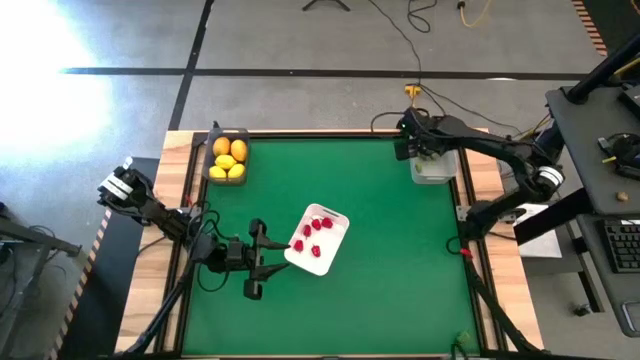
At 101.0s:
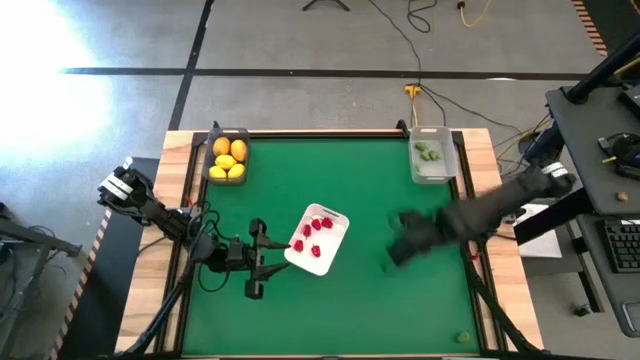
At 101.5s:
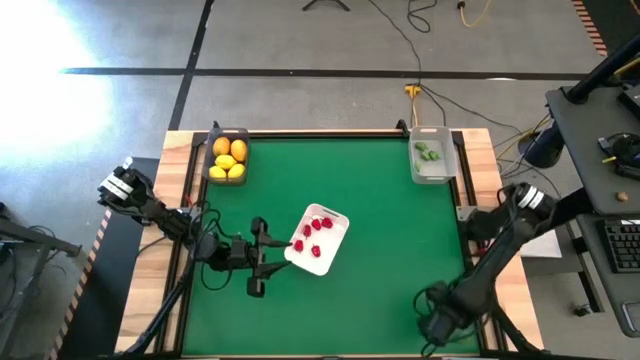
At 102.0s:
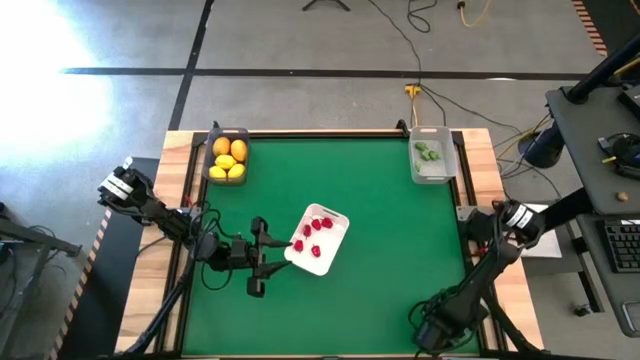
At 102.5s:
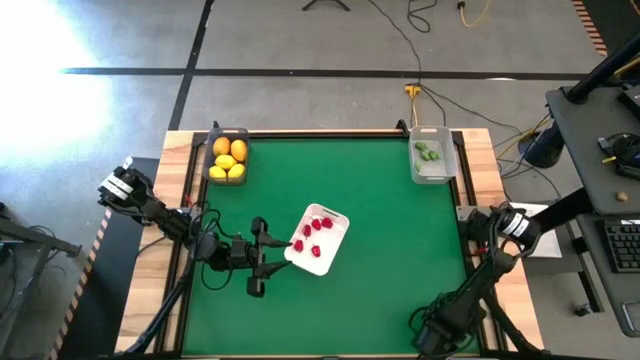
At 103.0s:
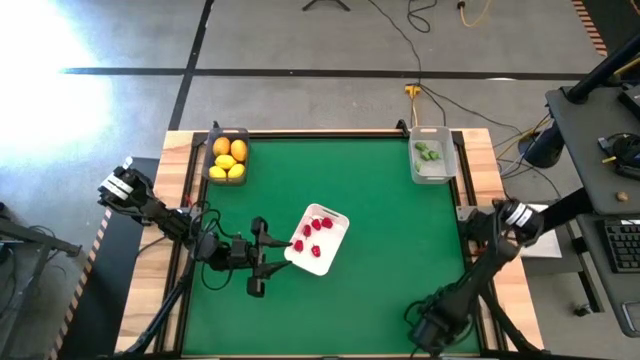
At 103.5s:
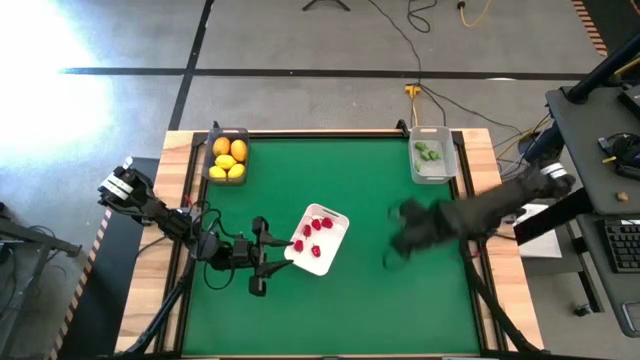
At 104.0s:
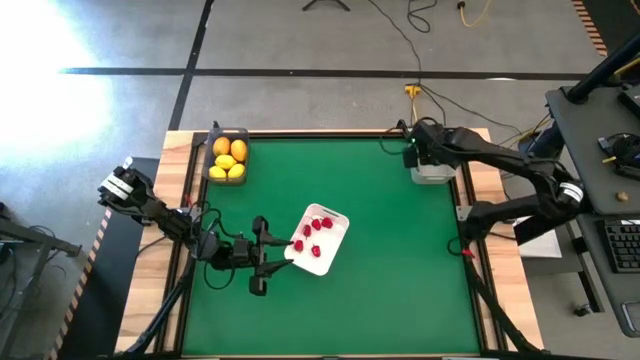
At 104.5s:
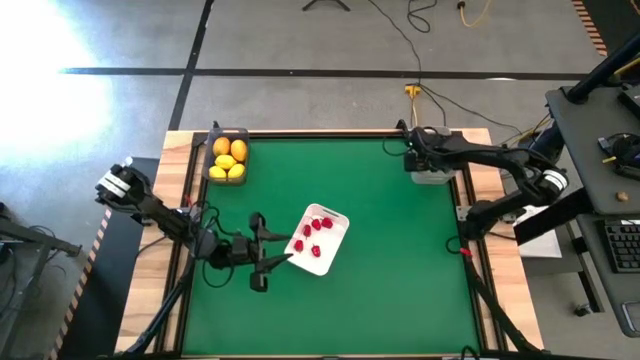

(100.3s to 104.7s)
Task: Sort produce into baskets
Put the green chili pepper into the grey bin

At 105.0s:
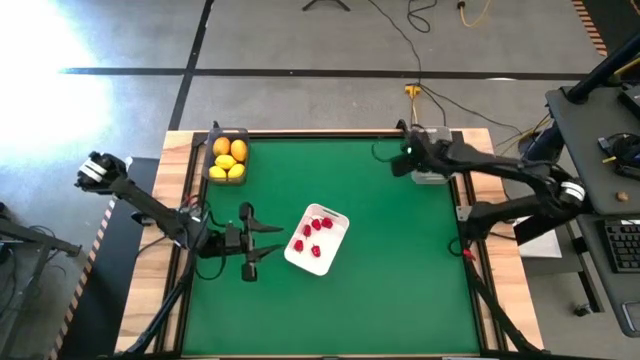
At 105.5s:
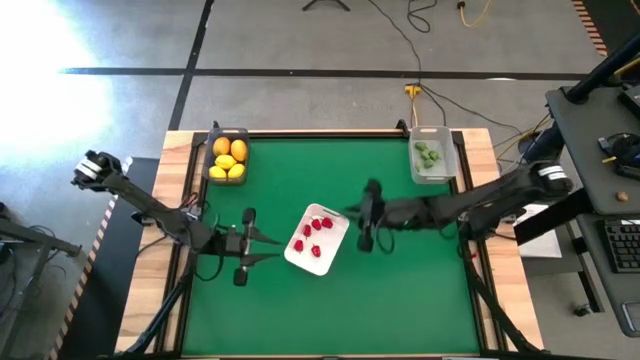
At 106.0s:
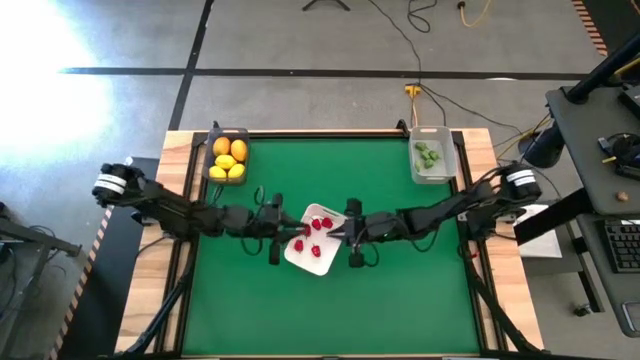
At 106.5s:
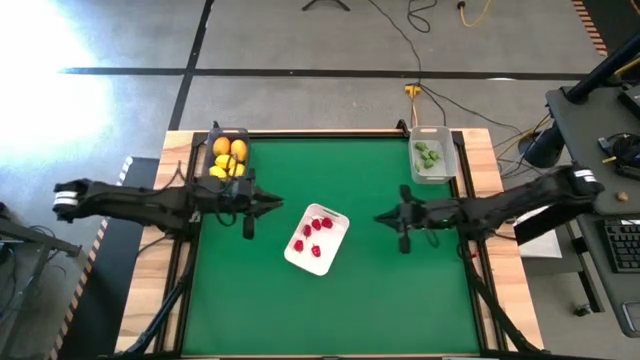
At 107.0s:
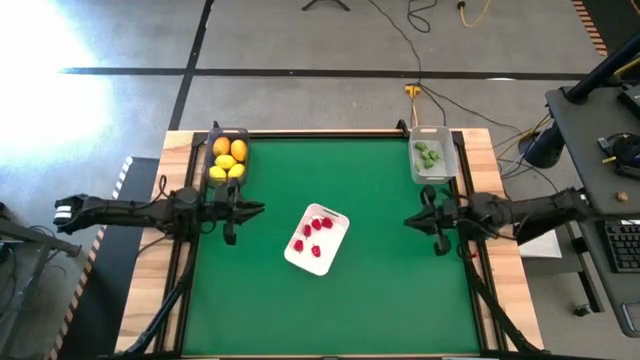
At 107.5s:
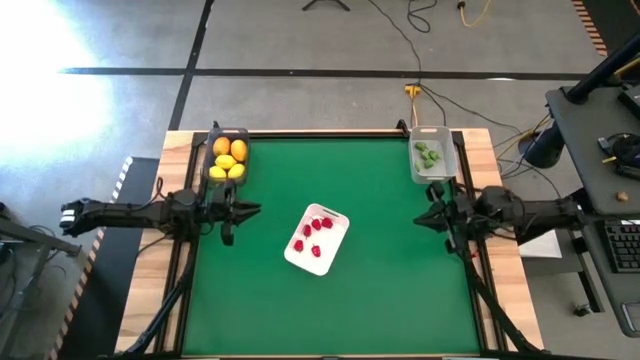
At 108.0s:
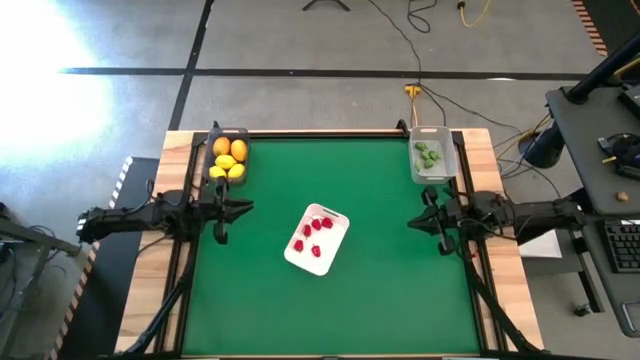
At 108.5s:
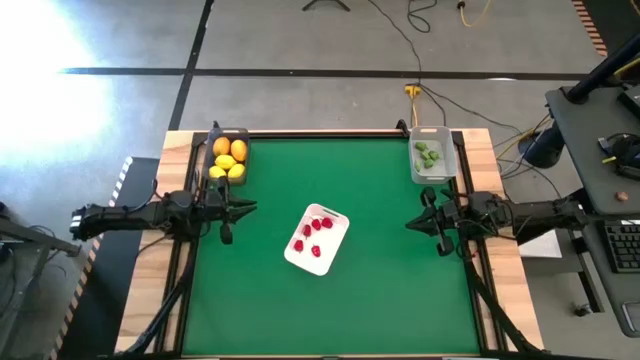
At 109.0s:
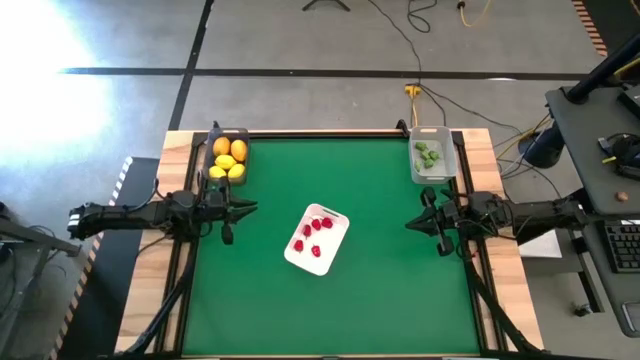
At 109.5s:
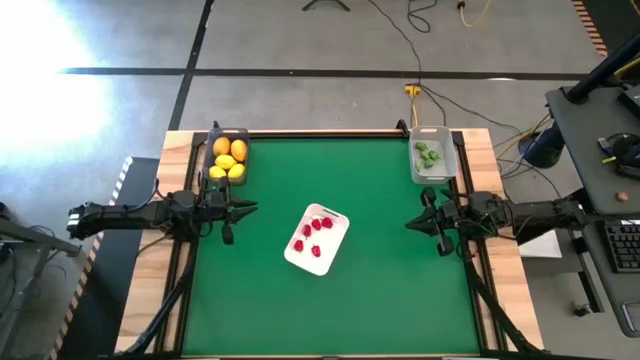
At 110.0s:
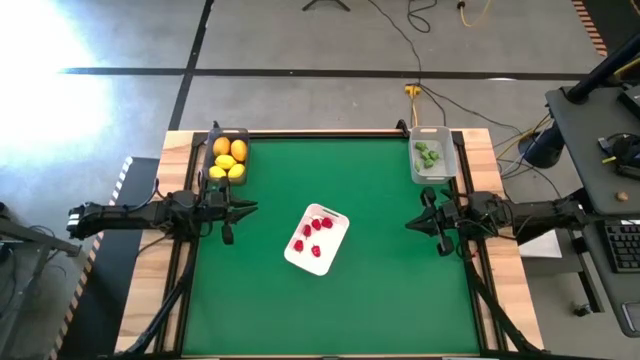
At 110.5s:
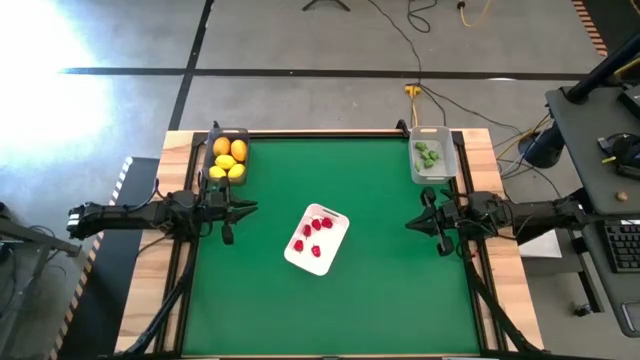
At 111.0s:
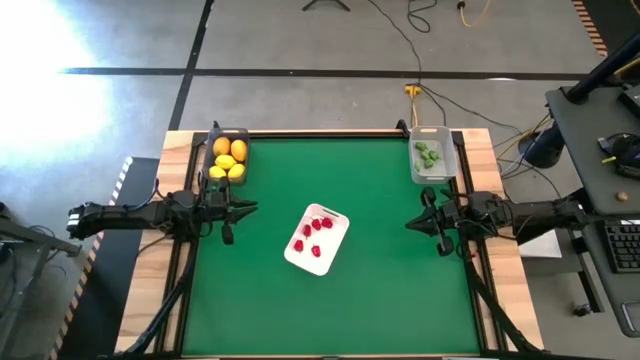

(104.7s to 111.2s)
Return to Home Position

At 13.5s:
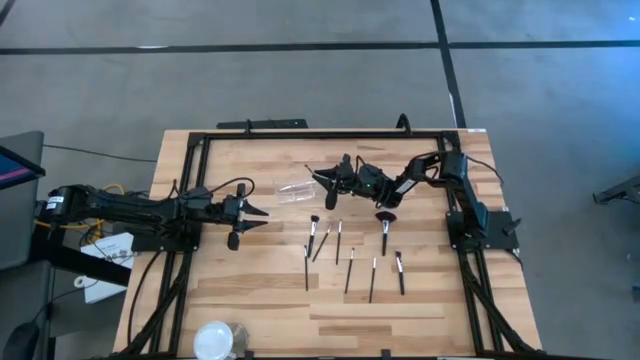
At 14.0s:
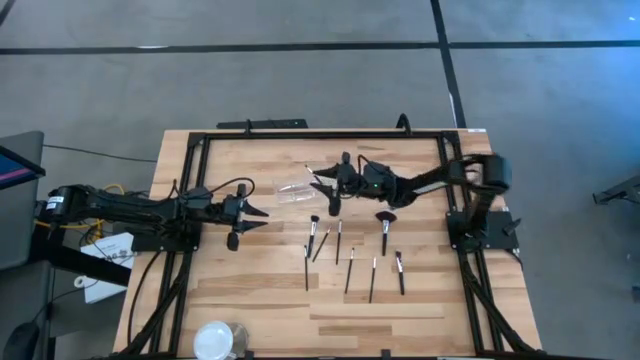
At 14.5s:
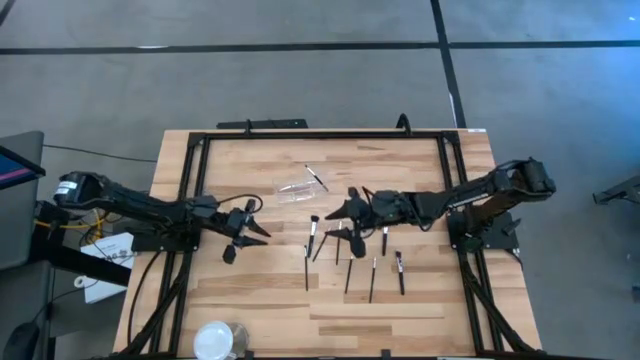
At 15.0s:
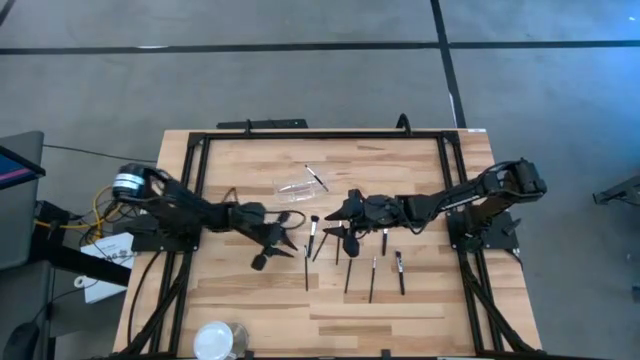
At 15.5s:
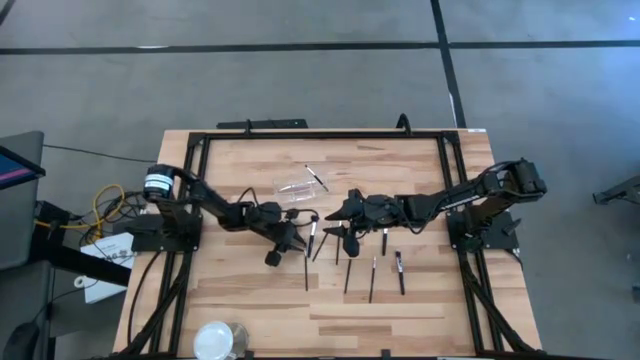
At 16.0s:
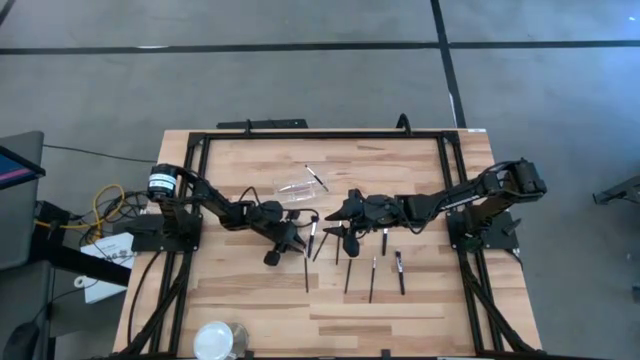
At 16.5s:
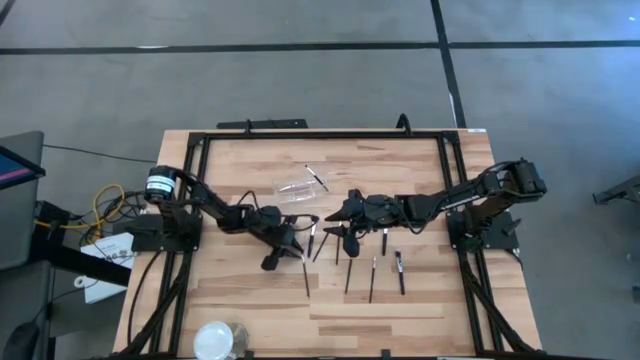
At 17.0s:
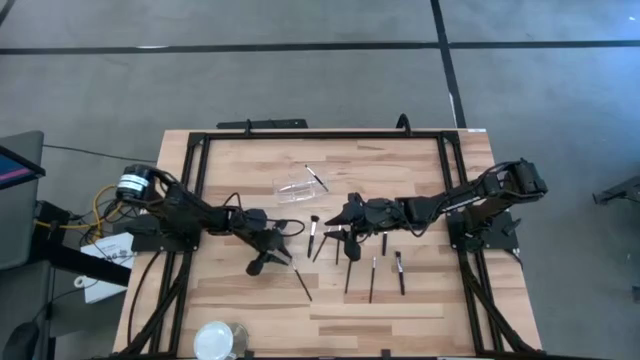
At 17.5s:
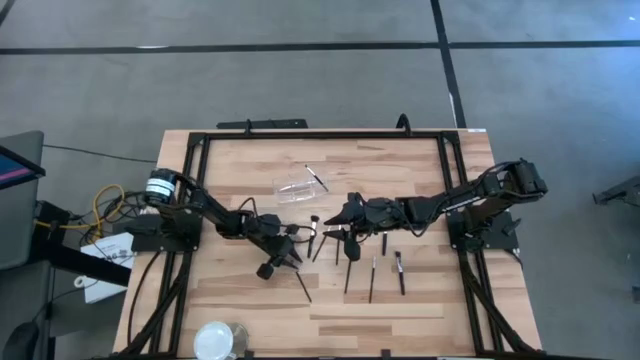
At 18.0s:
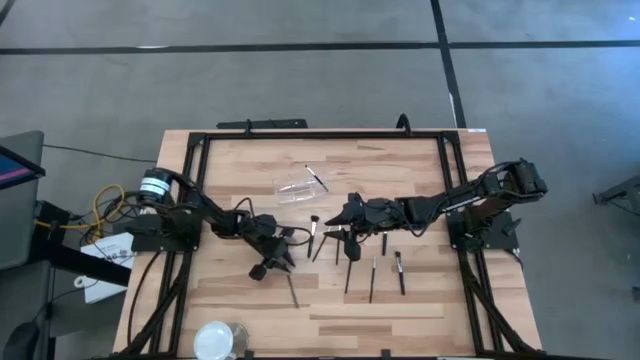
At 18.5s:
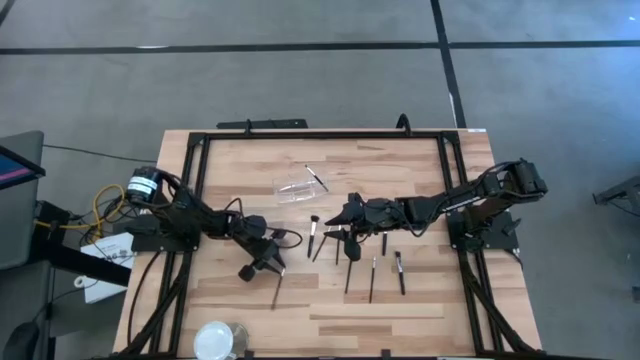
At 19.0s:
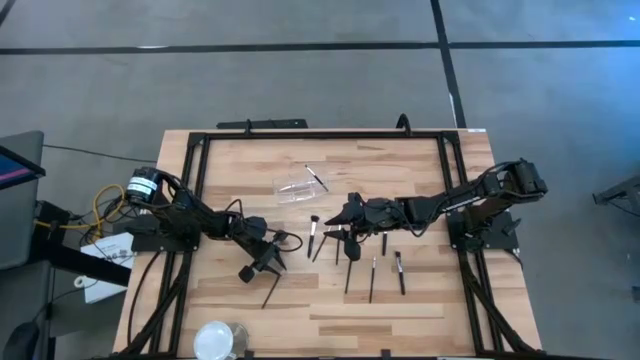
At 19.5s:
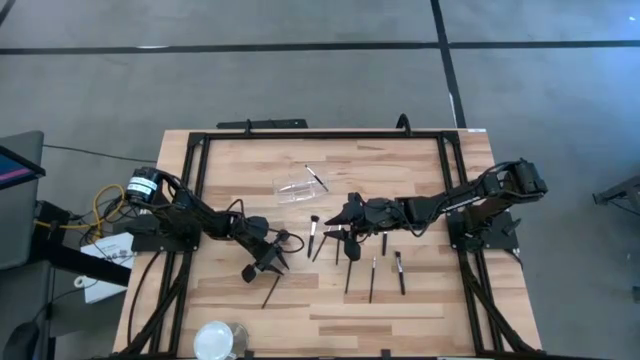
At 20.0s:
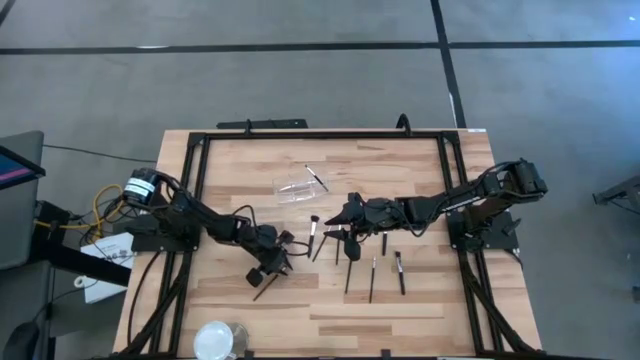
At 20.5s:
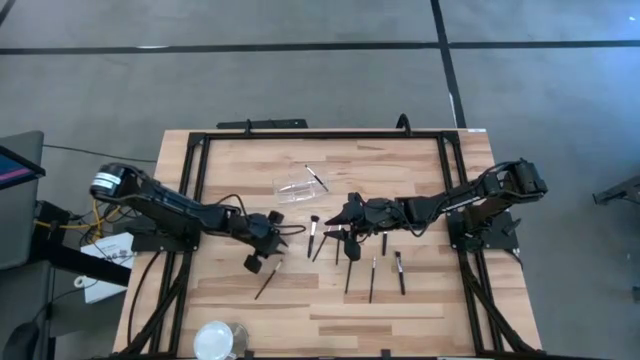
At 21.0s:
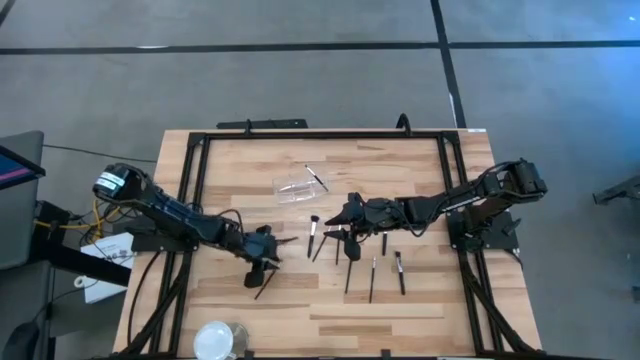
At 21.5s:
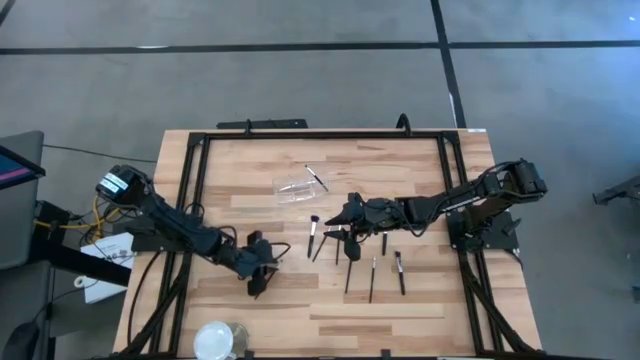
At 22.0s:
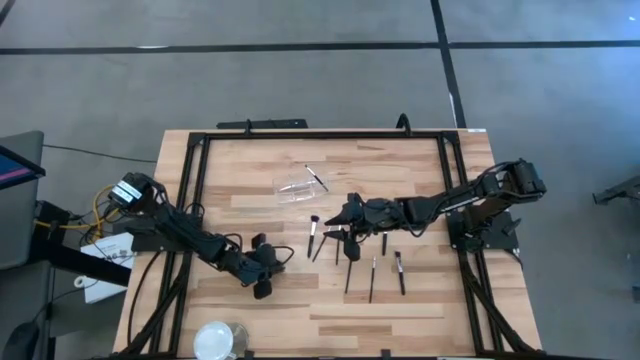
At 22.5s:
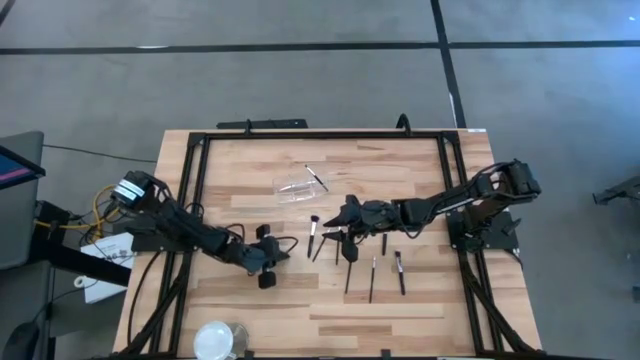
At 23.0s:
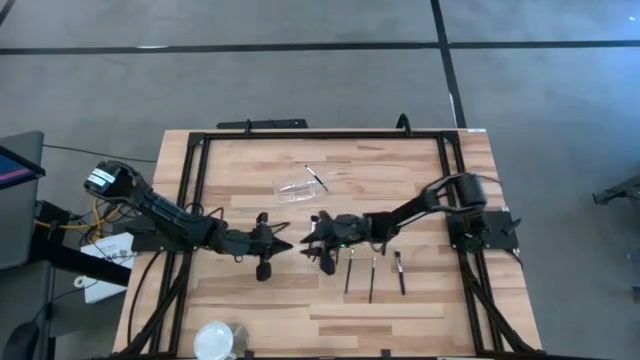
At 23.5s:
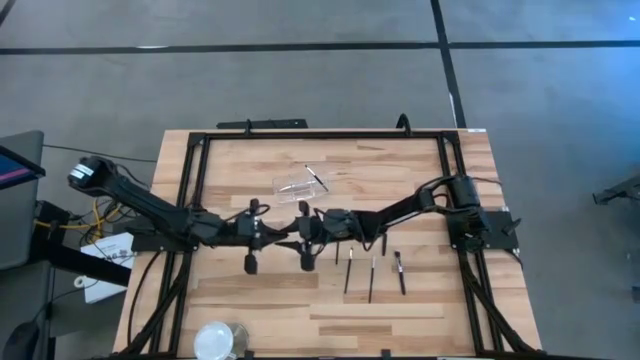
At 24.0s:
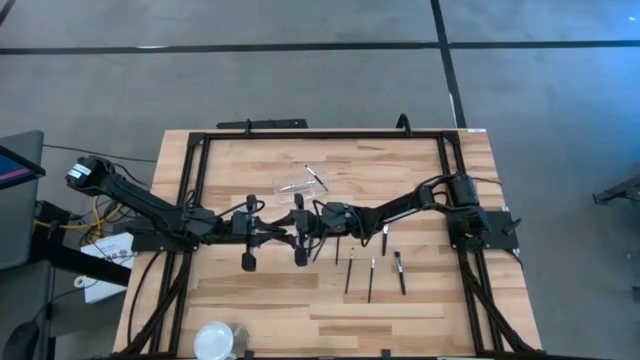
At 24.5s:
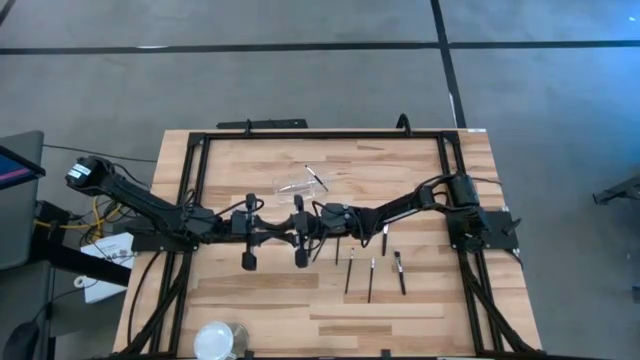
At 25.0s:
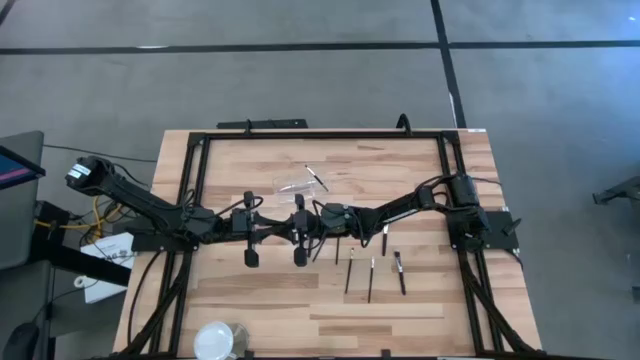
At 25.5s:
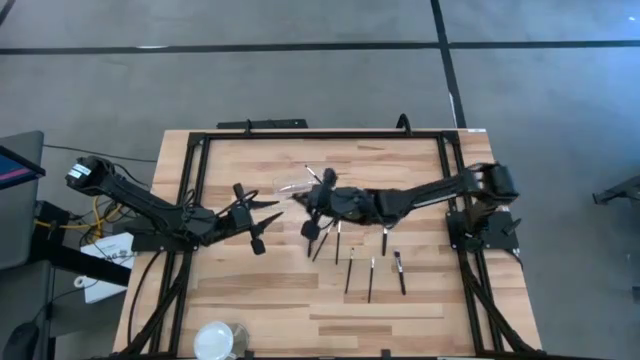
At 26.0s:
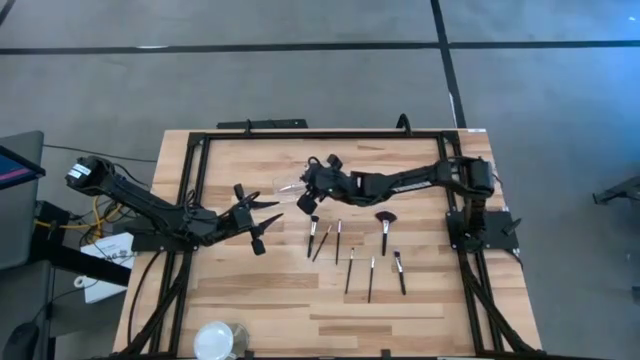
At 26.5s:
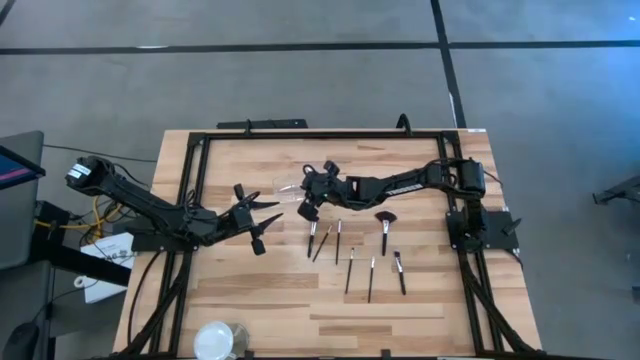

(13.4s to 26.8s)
Task: Put items in baskets/containers
Put the black eyeshadow brush into the transparent organizer
